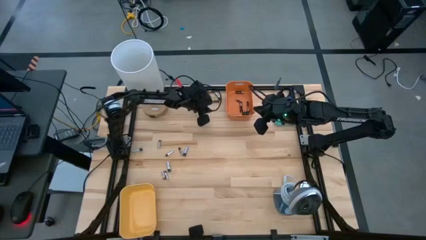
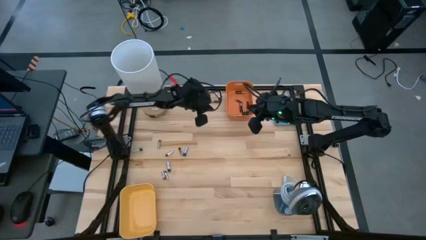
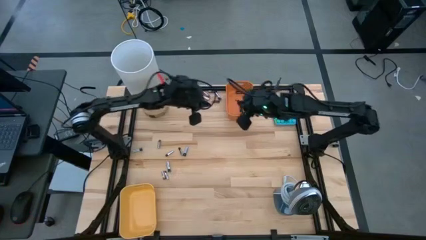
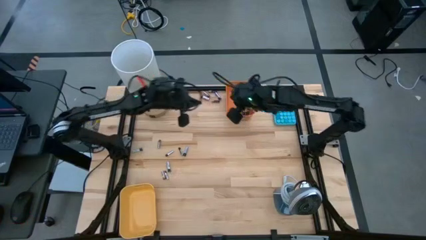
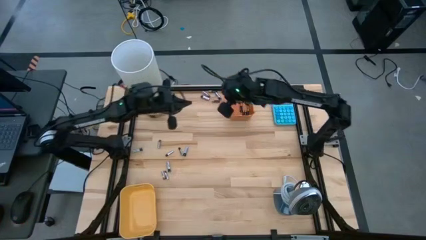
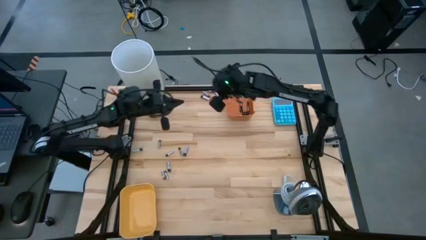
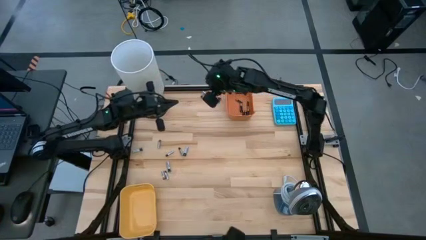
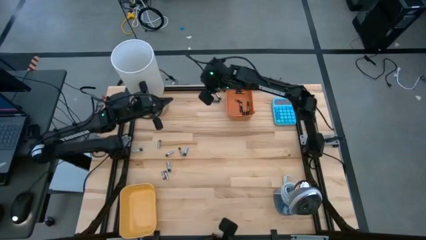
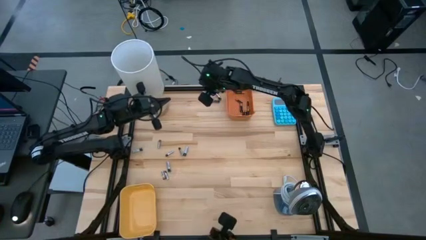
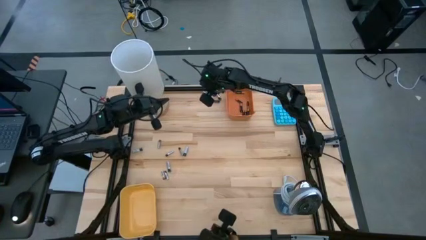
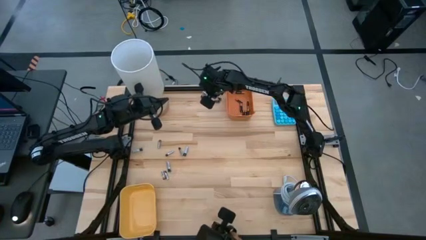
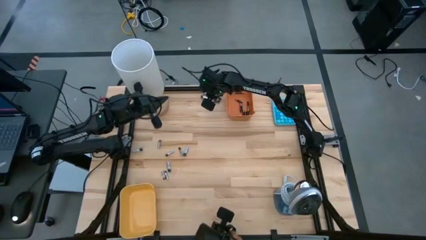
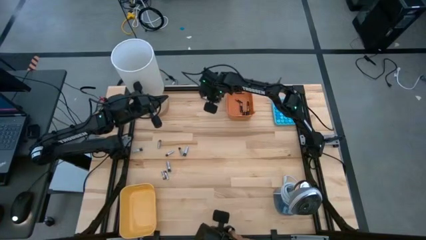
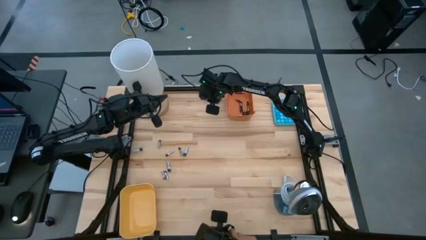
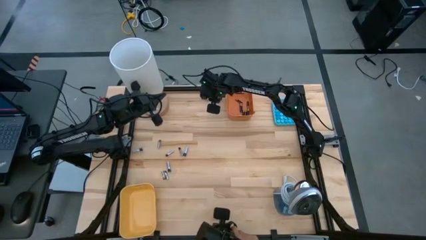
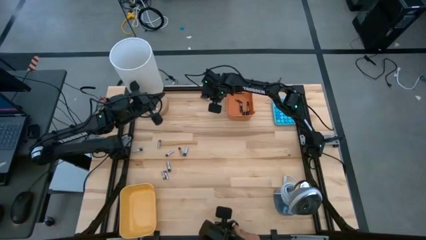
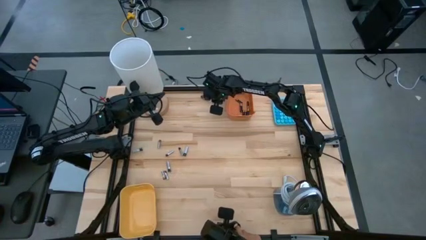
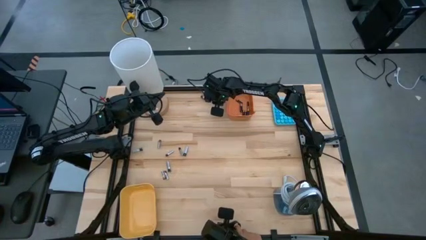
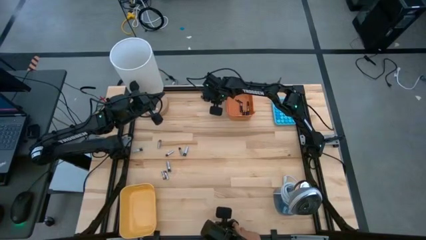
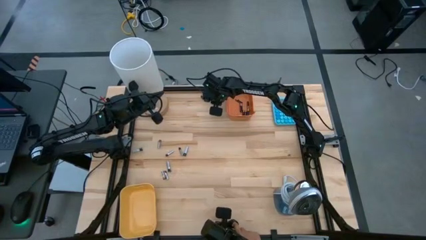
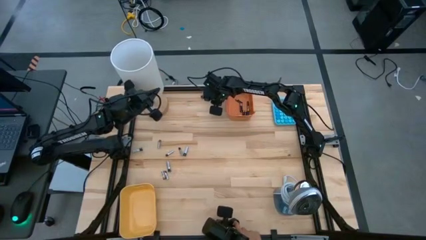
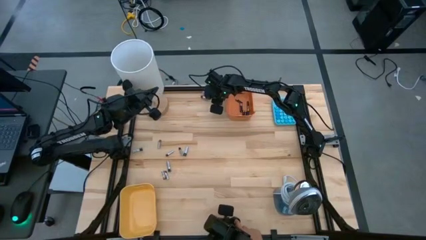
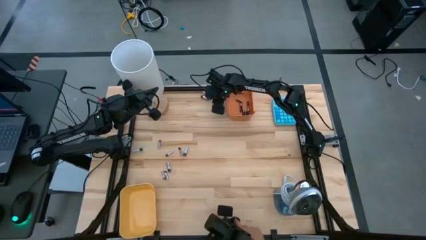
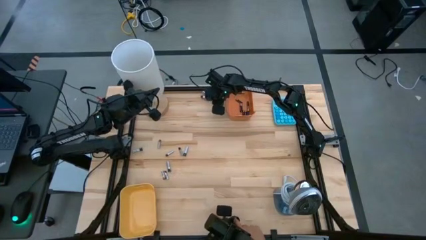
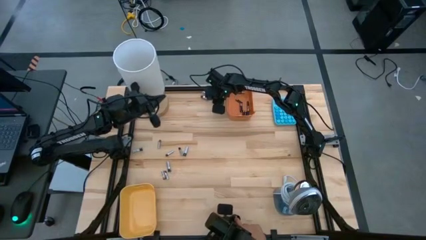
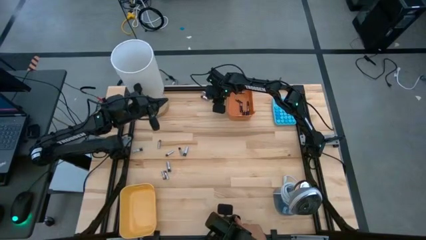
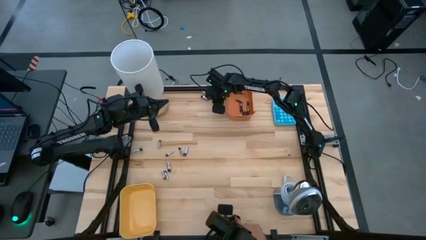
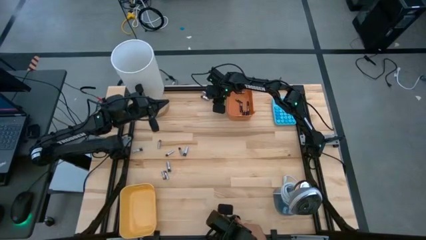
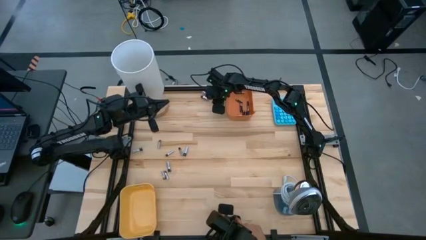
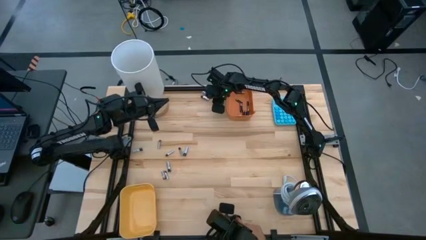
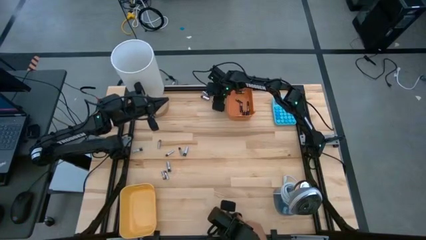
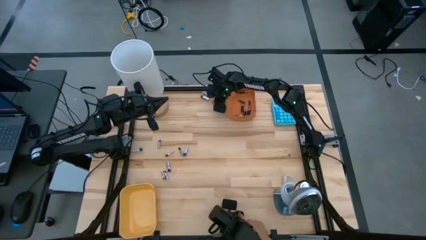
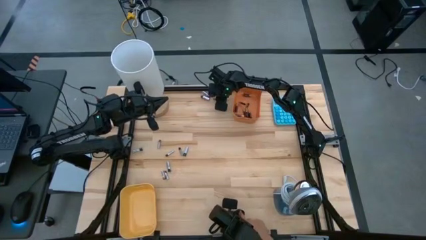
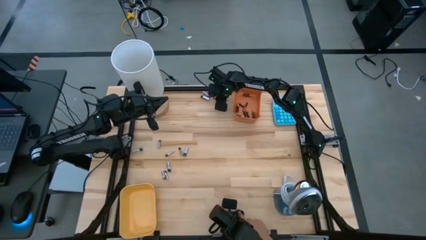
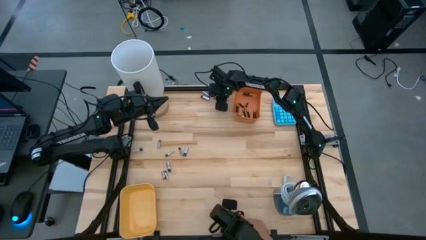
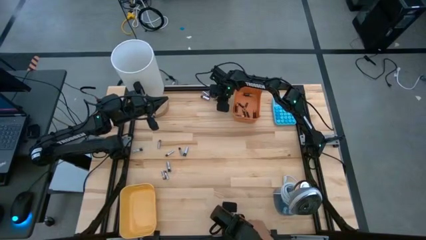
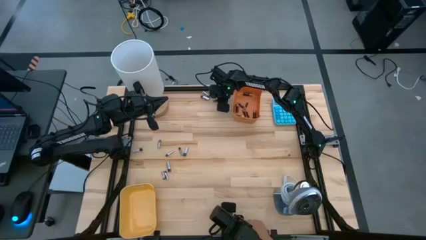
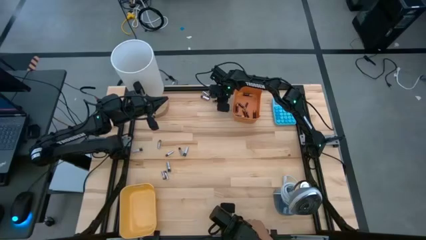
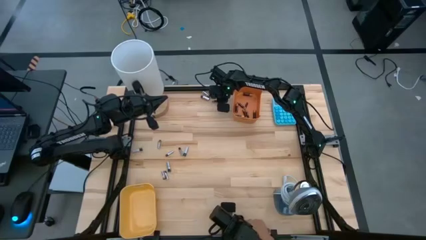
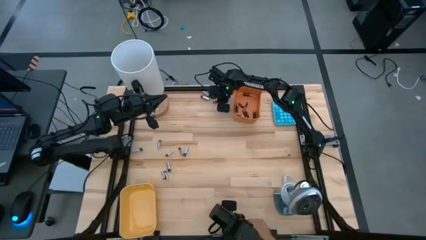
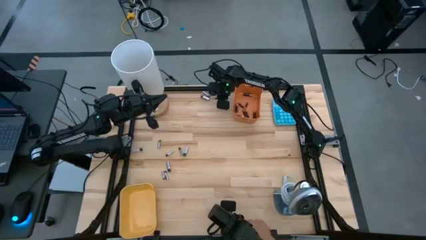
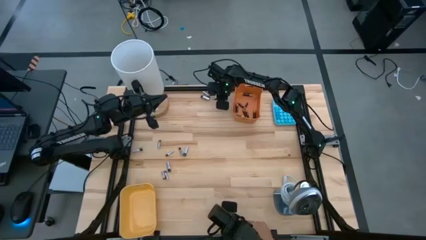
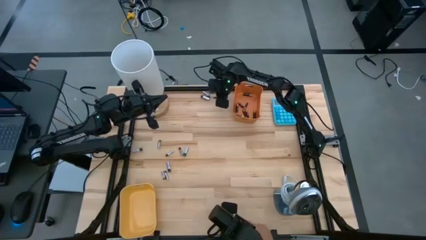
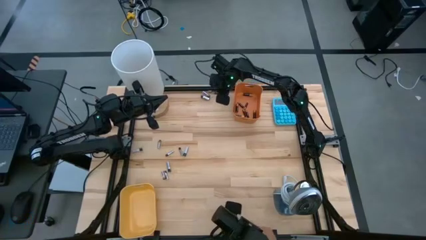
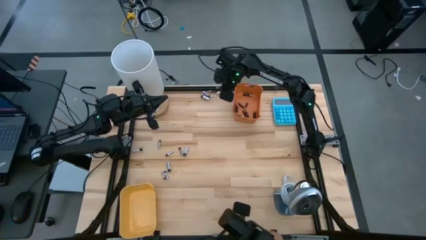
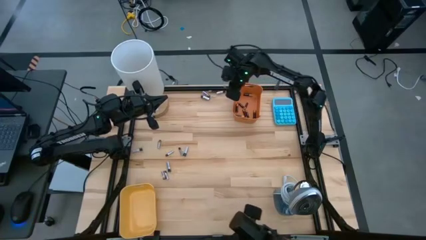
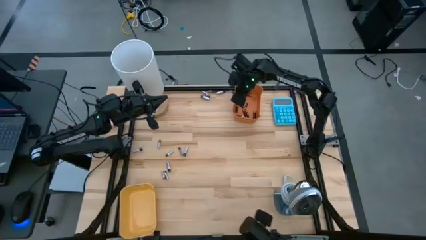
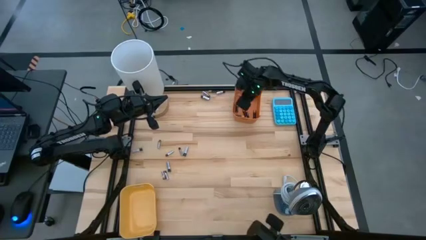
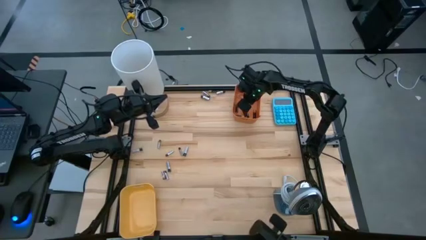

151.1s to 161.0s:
Task: Sort batteries
Put the black battery into the orange bin
